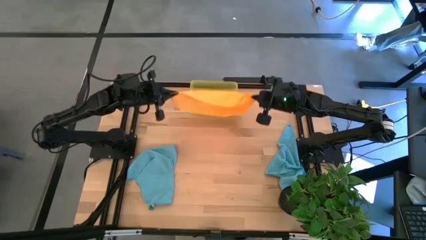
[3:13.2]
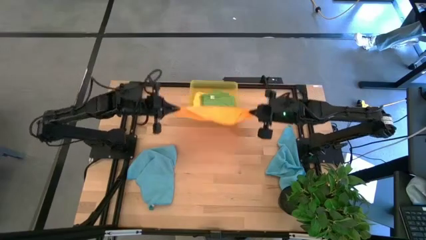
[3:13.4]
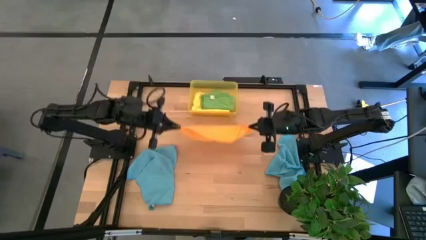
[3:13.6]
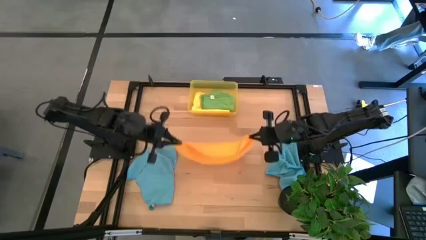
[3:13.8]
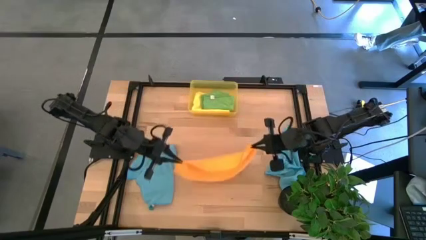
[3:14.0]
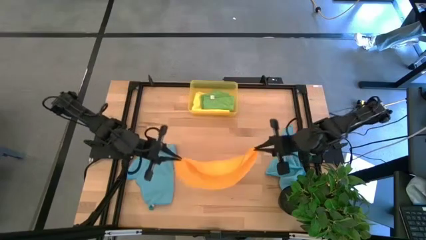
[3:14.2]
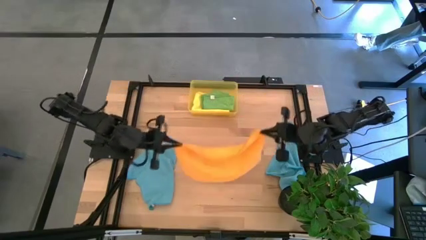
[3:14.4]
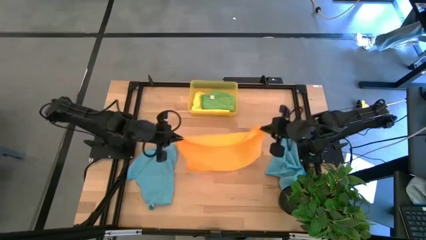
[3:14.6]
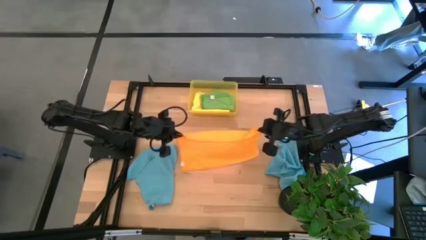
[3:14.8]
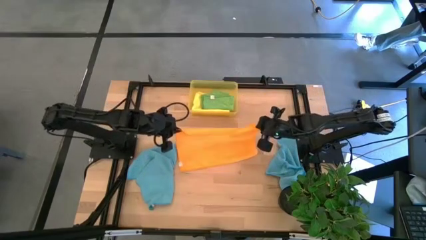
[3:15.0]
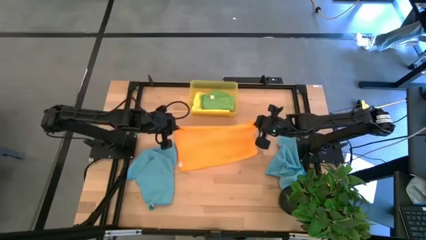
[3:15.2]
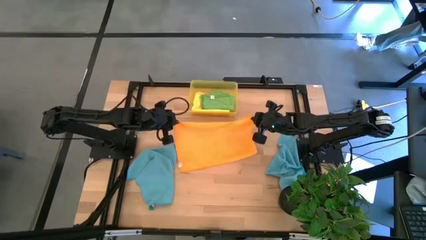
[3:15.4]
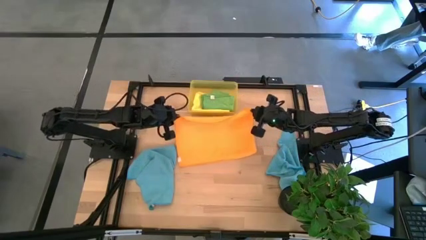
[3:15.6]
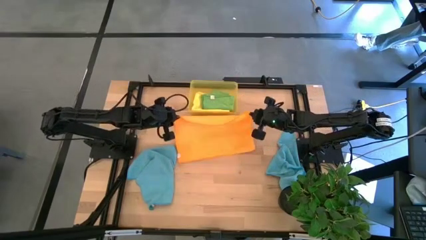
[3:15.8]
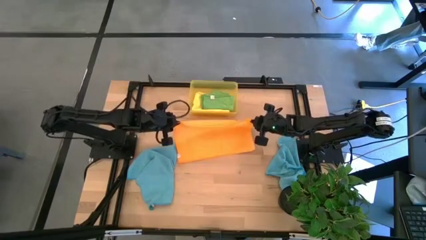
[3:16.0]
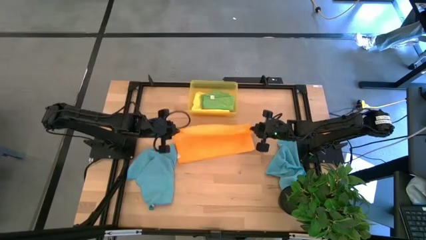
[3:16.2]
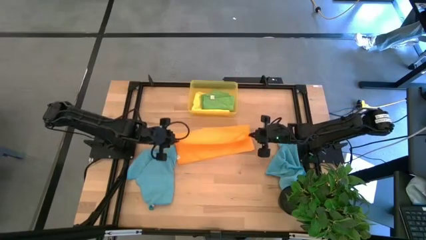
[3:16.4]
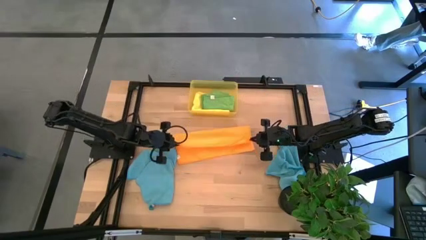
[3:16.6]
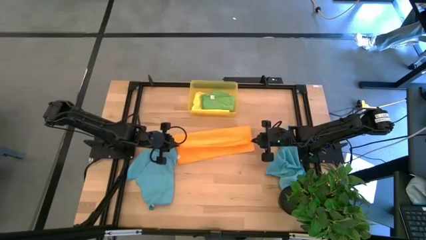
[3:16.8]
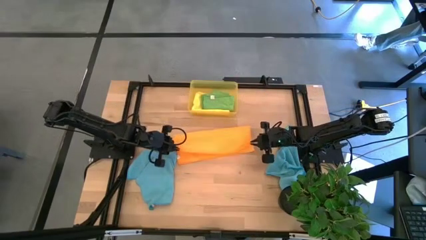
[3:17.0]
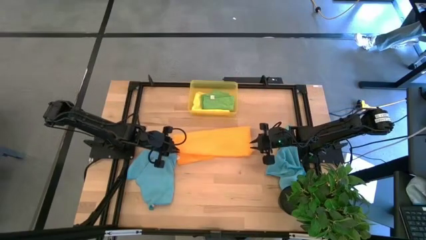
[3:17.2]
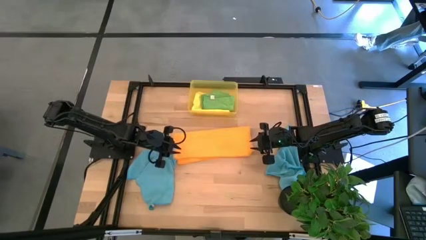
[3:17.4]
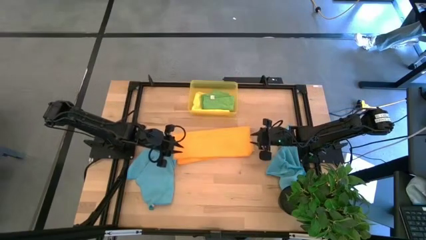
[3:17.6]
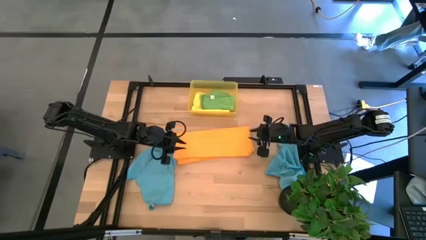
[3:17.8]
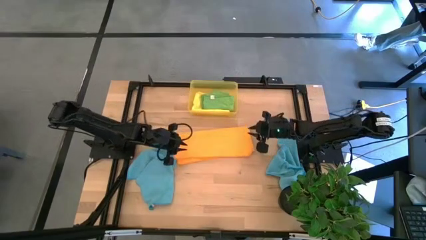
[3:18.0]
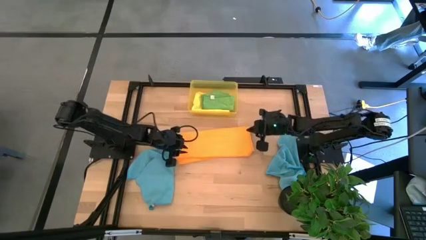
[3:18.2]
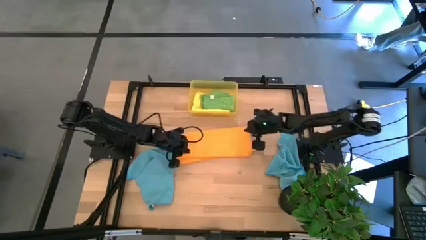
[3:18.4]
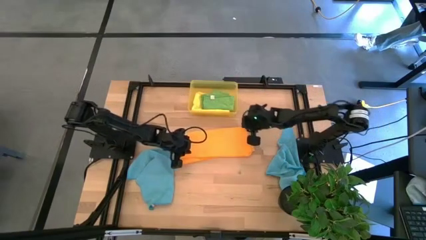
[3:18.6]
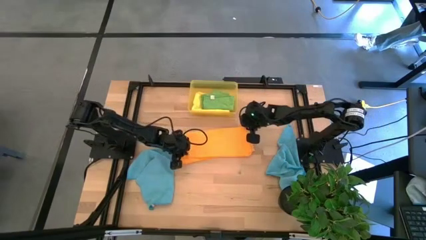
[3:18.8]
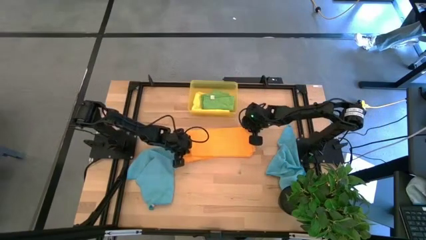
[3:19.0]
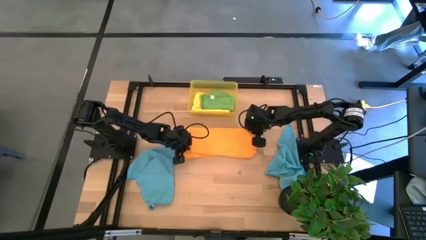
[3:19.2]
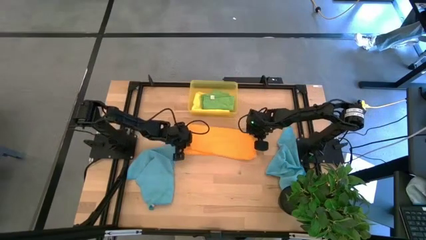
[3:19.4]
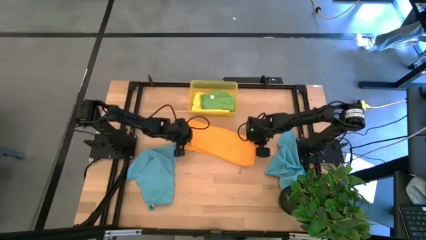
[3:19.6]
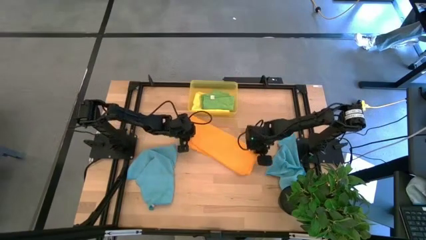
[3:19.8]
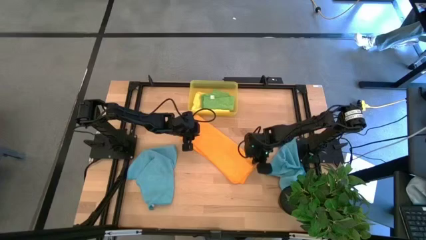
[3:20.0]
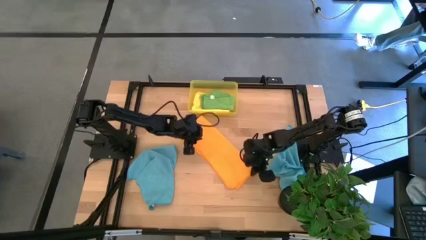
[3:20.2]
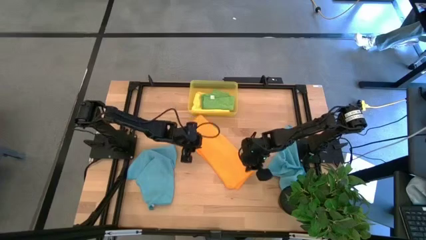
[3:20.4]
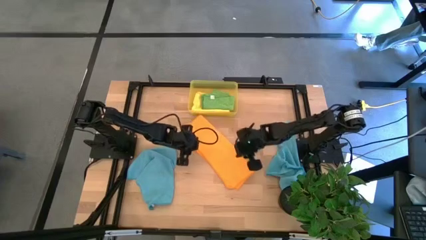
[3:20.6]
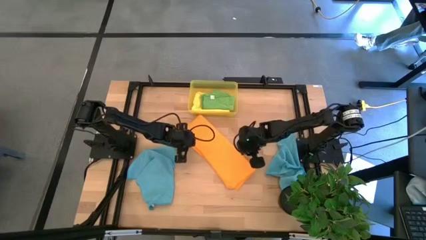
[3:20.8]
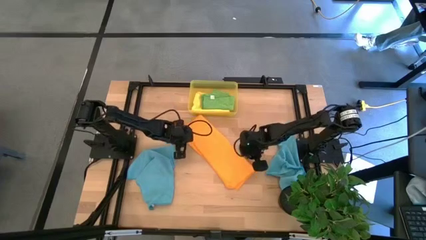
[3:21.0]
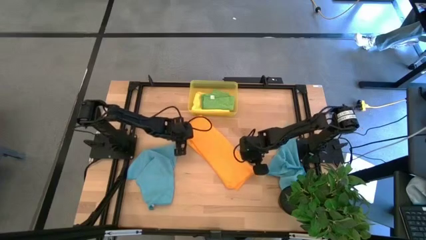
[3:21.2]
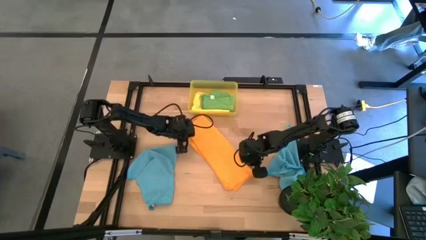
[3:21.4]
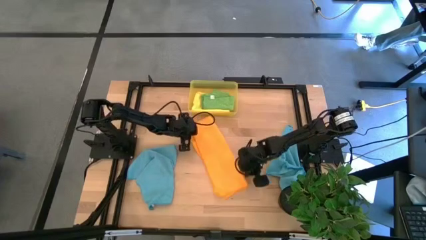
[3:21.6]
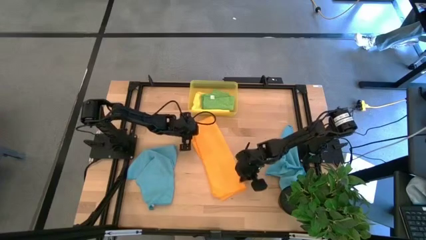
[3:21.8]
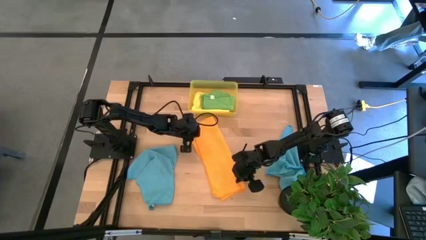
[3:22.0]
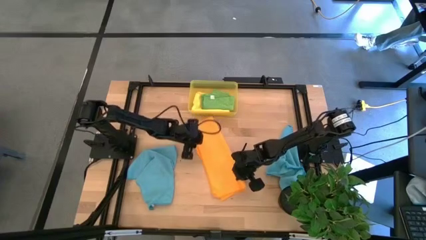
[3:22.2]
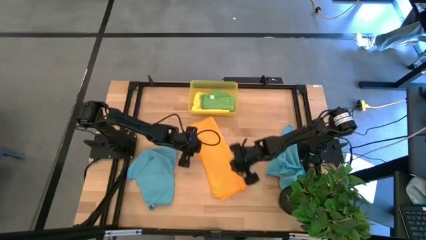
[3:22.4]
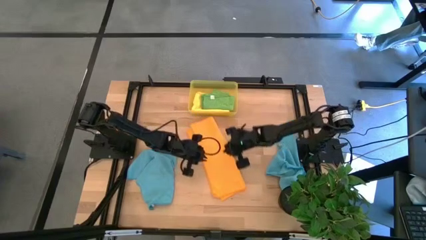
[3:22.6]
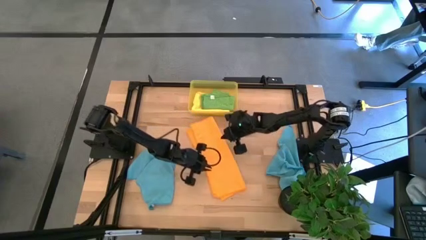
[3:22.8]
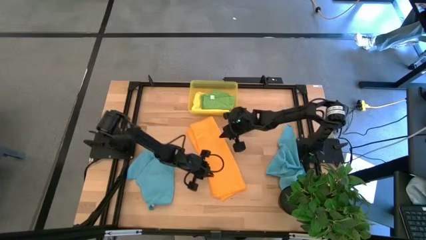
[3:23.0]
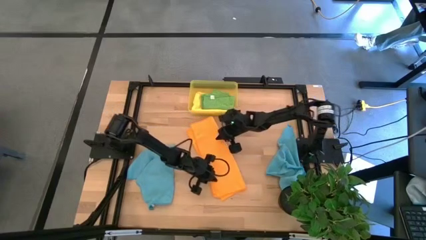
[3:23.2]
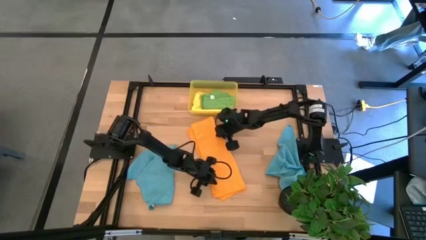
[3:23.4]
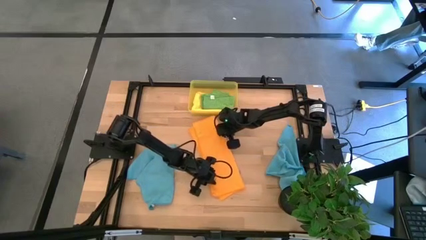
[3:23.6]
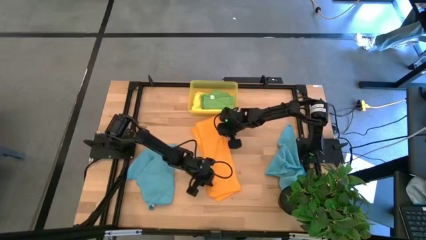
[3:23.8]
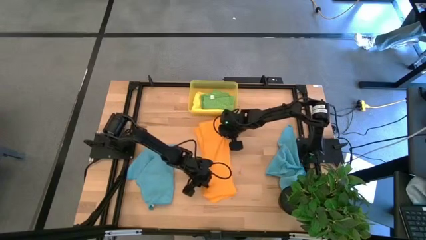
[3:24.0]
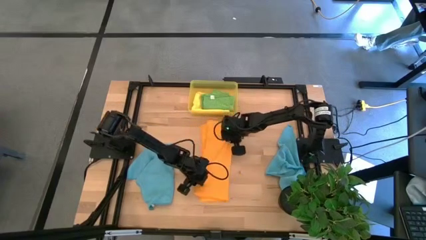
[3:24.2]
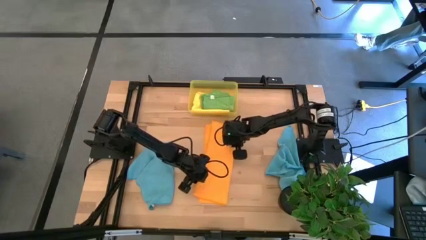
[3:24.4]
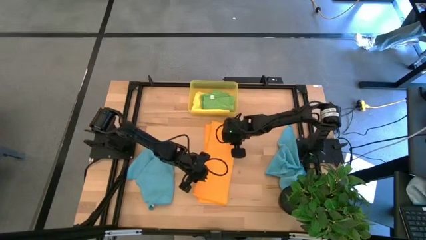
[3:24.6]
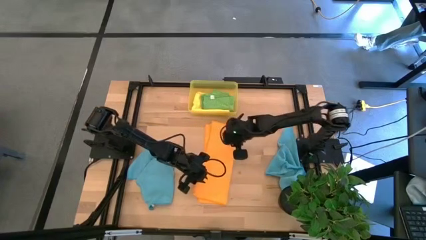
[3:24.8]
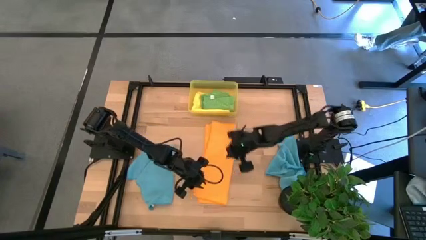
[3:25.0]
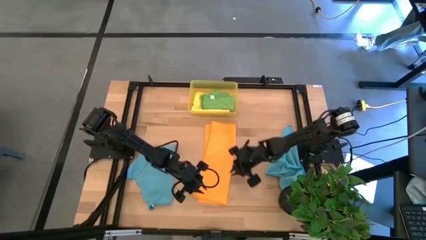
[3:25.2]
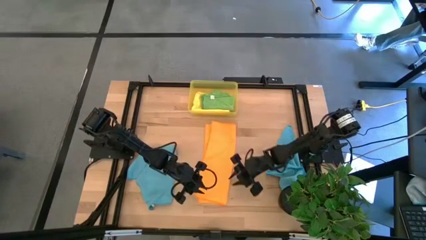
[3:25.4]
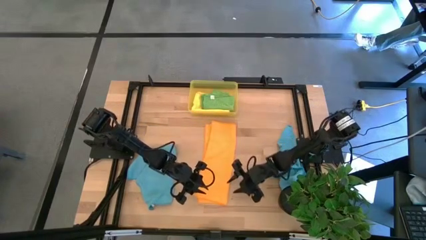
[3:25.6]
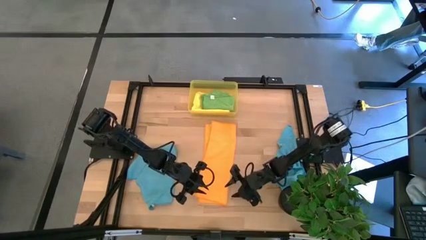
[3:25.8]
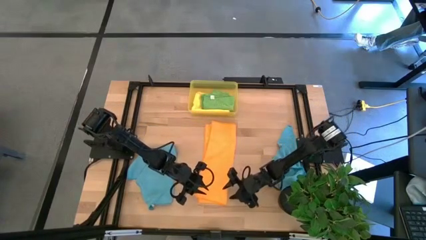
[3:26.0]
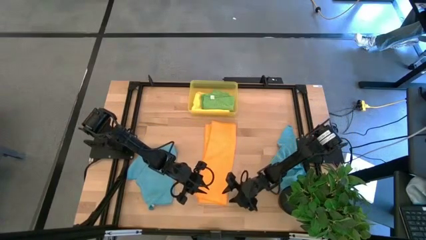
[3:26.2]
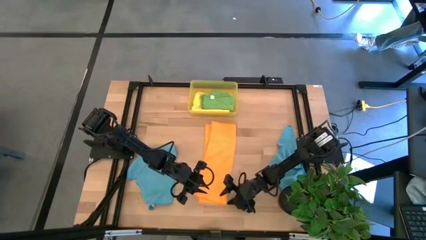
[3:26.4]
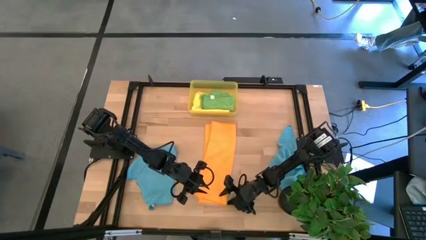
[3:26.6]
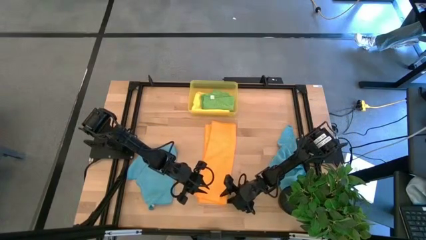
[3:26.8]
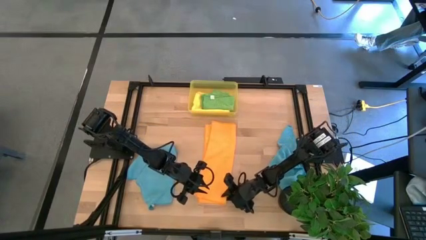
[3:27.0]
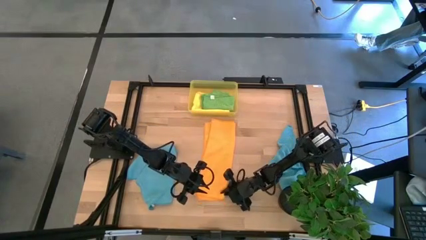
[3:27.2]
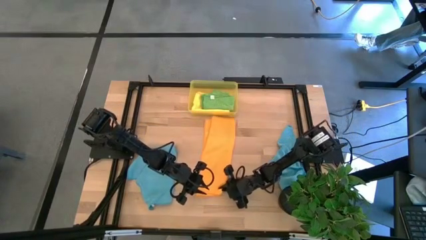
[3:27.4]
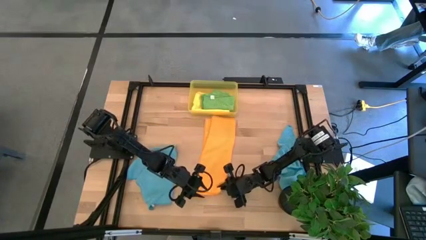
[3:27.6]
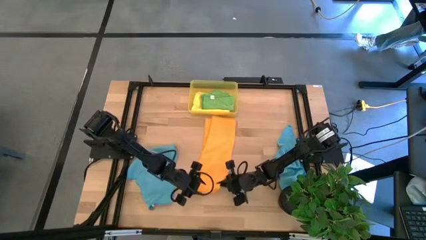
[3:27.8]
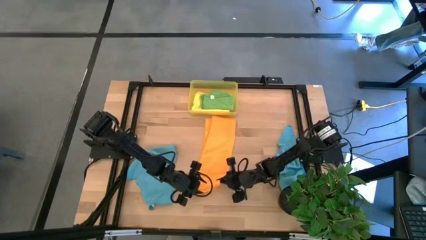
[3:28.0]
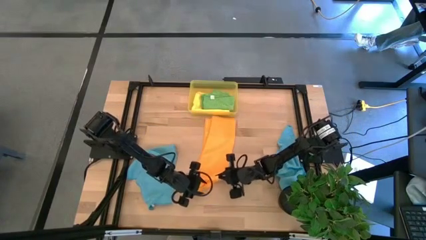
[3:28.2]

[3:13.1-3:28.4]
Task: Fold microfiber towels
Fold the orange towel

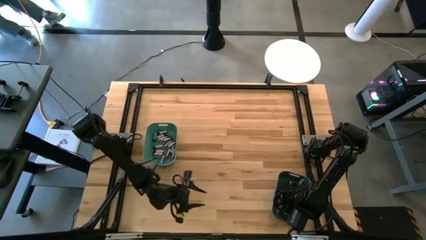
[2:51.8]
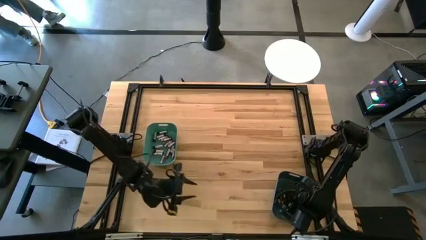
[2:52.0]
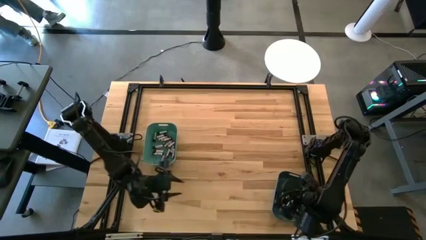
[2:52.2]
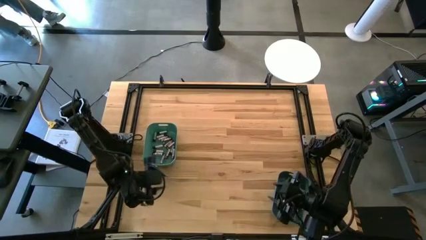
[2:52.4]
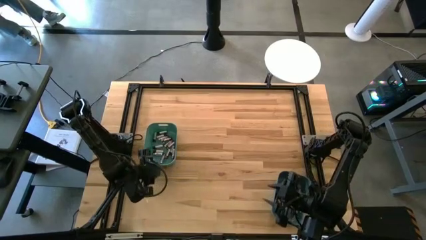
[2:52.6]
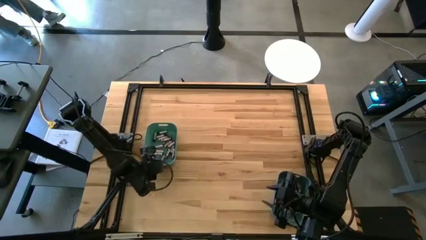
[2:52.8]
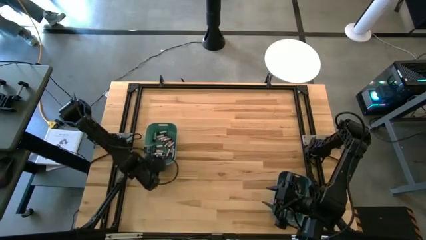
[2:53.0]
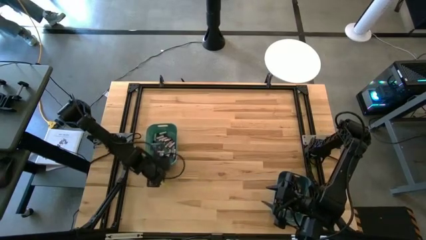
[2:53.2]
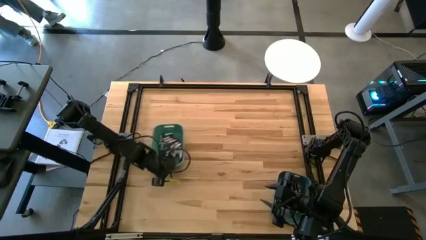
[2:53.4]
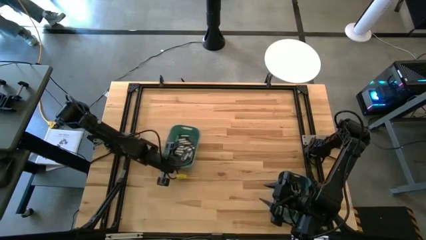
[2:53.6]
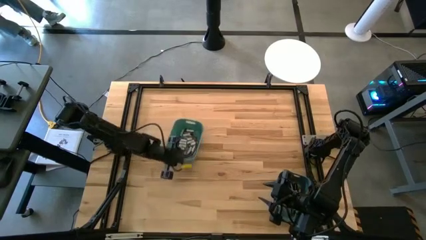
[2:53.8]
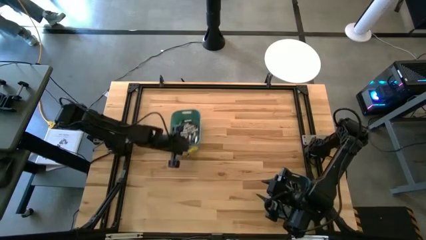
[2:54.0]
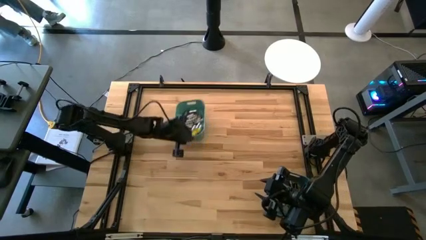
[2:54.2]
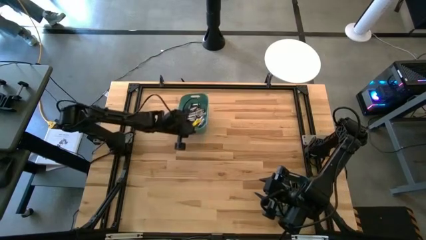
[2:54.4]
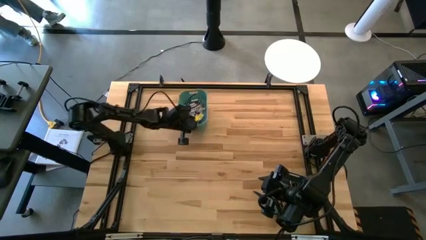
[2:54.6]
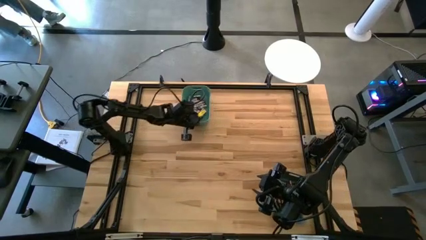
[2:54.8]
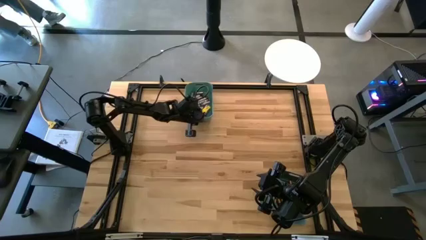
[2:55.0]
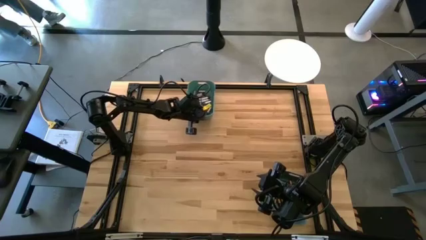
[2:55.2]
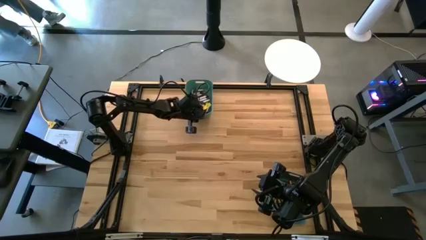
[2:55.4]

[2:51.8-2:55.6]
Task: Sort batteries
Move the green bin to the top of the table
